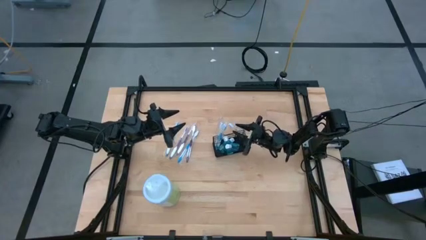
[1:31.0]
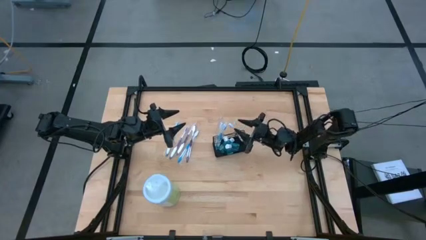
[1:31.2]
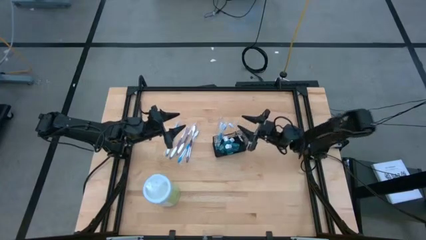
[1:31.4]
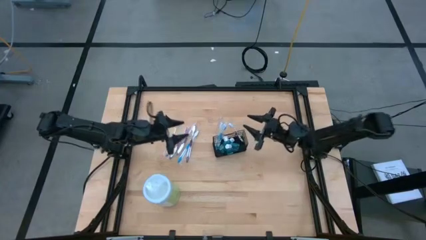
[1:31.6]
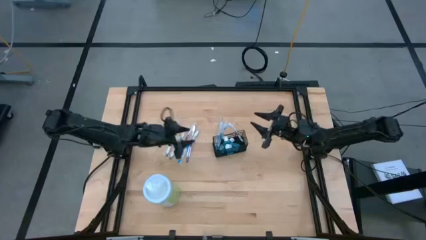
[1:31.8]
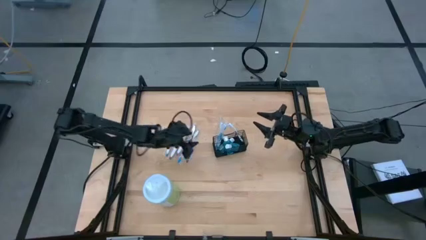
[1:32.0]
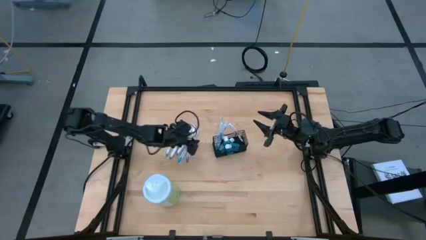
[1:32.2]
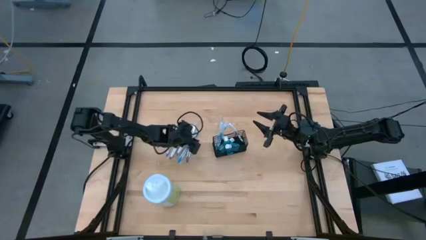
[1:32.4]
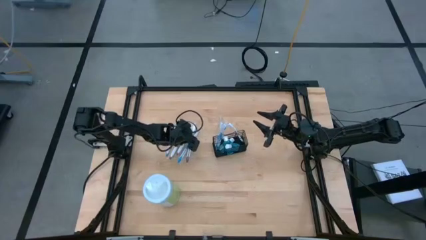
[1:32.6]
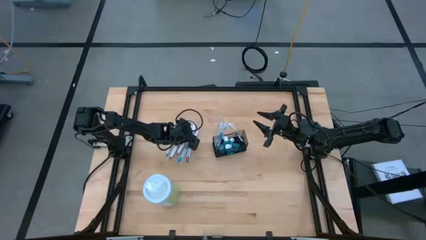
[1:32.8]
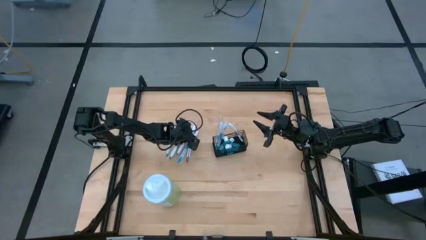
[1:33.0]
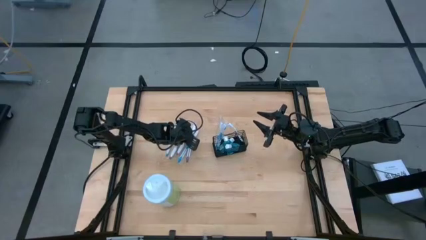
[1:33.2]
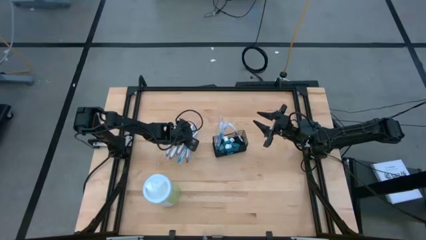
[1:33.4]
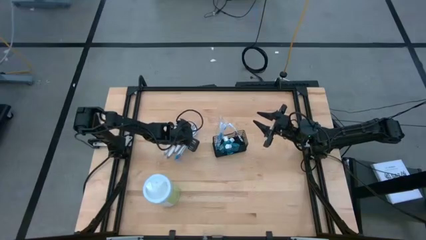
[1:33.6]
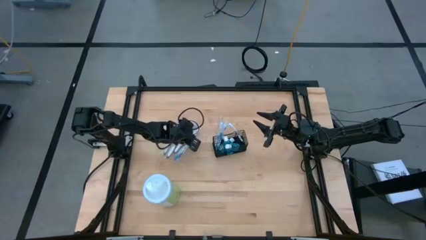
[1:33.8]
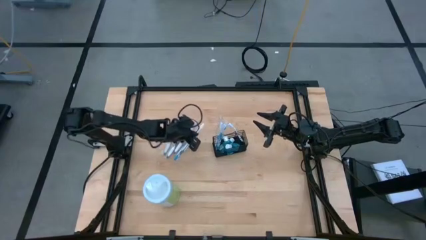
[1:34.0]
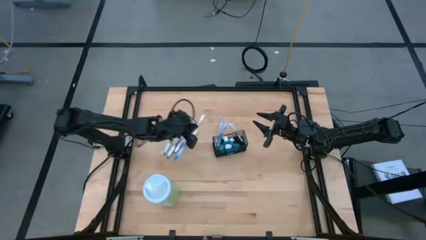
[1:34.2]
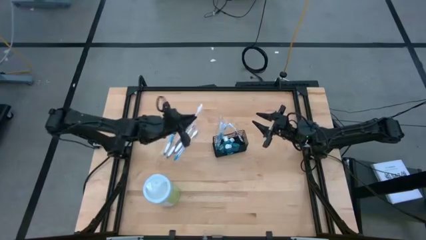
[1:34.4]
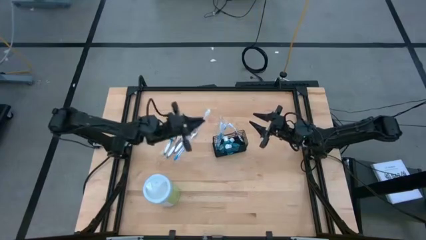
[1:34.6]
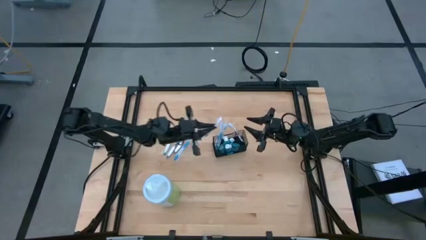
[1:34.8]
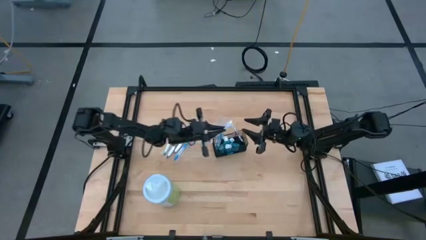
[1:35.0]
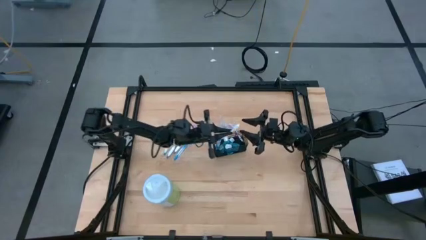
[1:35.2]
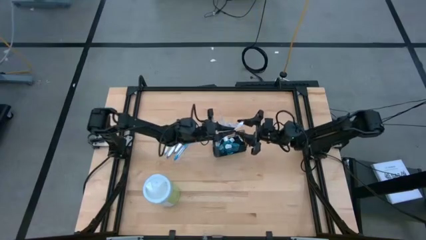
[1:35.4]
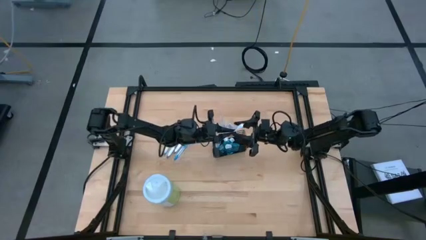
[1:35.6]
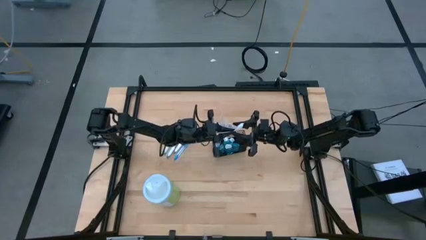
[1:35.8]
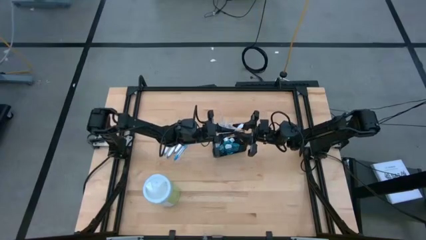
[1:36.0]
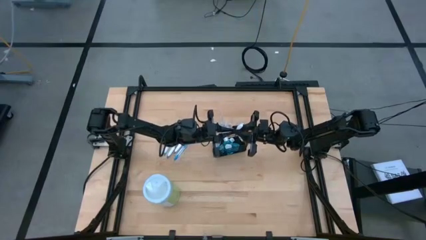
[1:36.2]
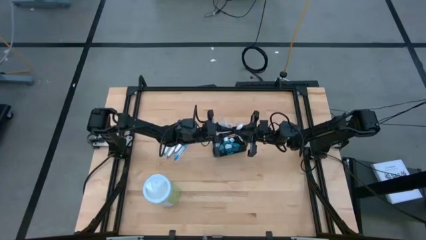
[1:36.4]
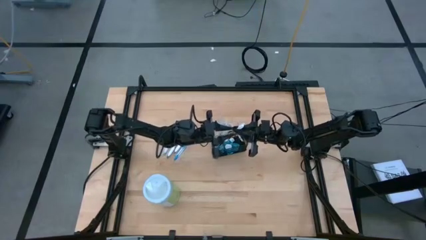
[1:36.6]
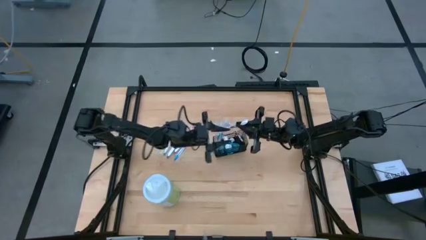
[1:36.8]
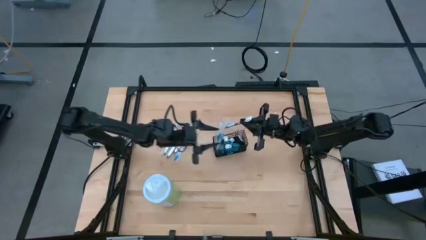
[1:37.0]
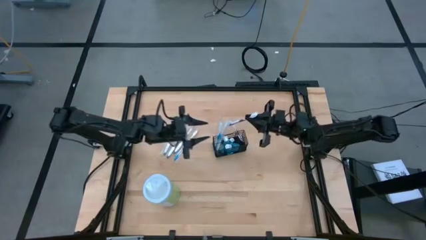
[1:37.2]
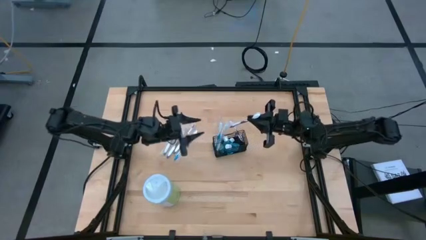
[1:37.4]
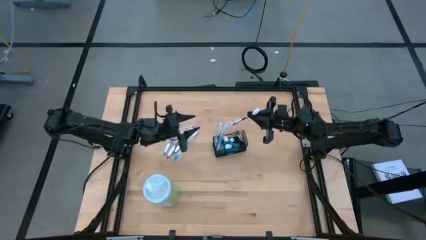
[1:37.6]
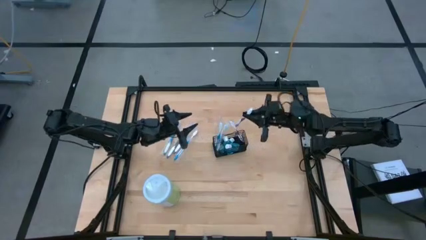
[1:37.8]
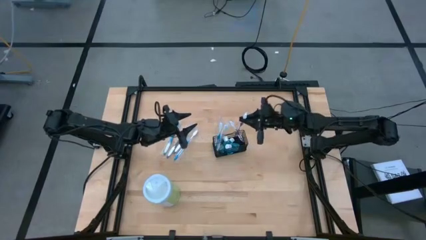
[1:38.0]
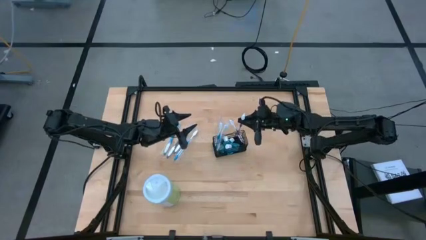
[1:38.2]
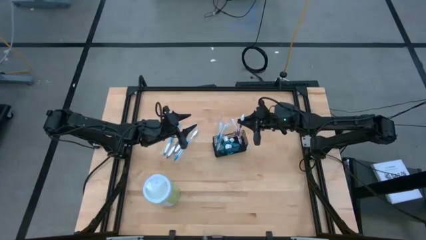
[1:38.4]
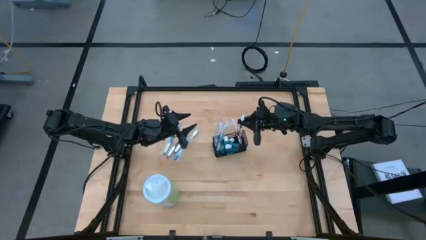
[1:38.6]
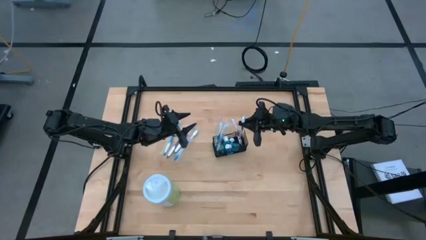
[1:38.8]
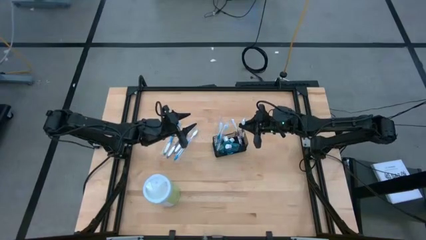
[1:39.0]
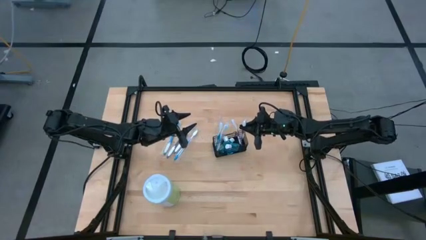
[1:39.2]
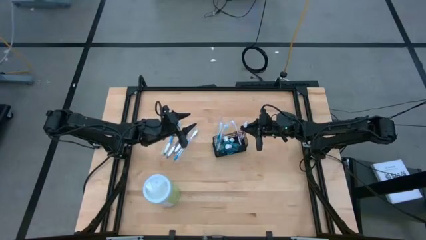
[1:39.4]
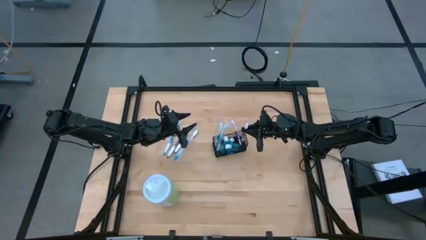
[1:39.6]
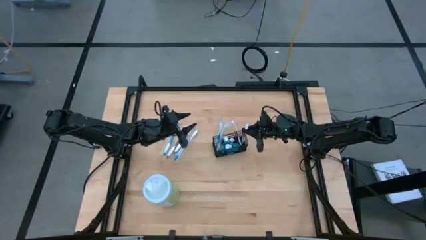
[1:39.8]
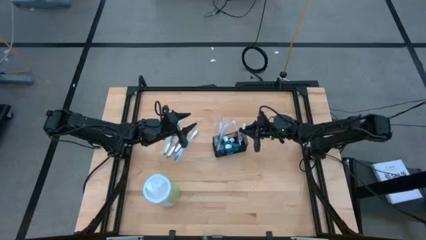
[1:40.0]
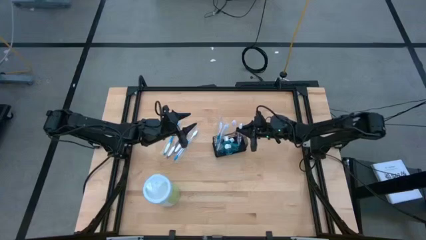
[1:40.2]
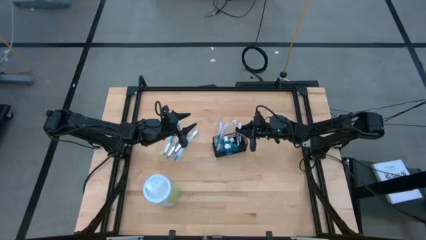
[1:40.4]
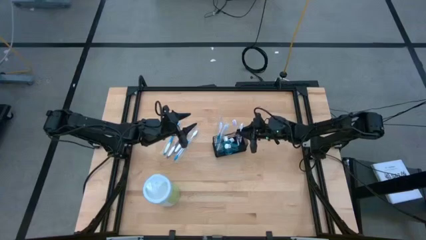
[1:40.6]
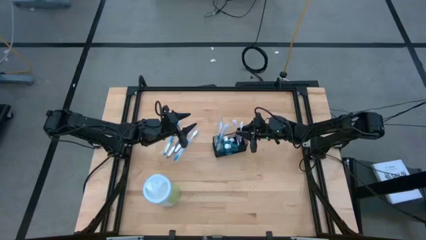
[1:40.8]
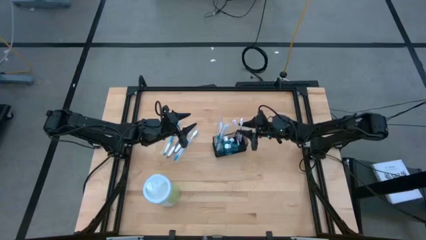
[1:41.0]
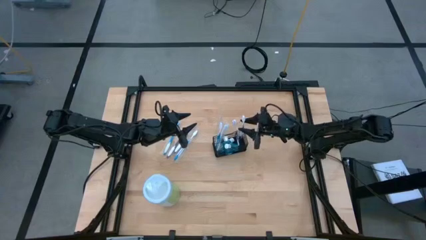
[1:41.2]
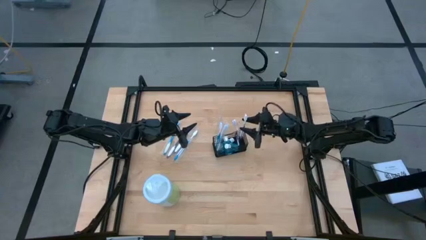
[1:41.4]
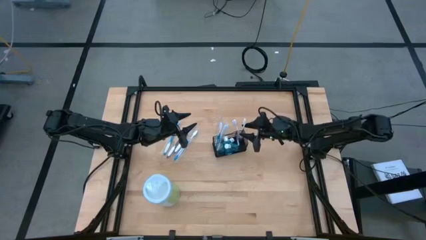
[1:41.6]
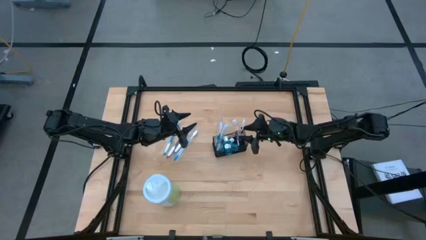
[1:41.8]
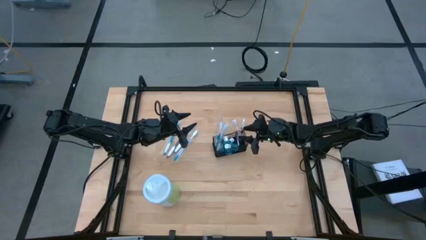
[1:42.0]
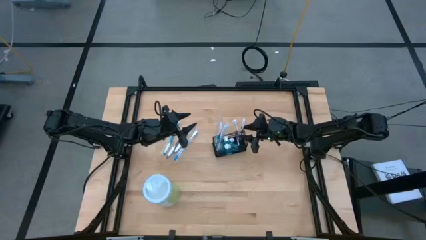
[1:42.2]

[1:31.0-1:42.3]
Task: Pick & Place toothbrushing station
Put the purple toothbrush into the black mesh organizer

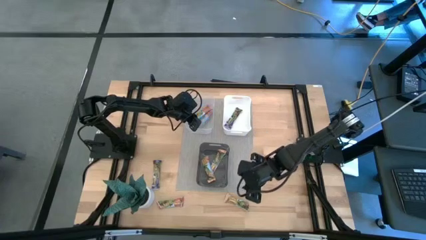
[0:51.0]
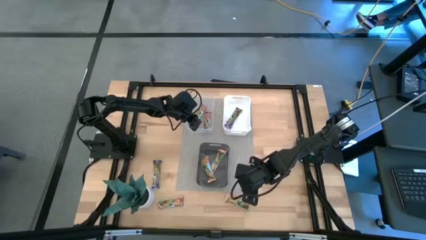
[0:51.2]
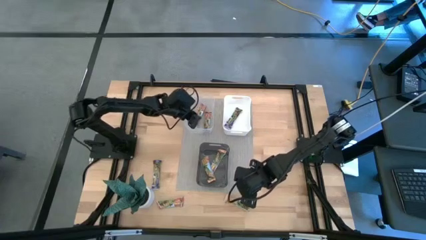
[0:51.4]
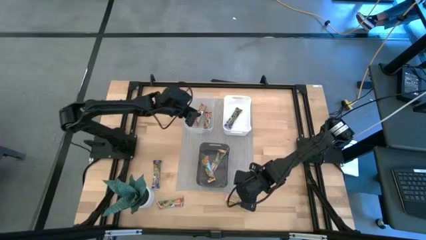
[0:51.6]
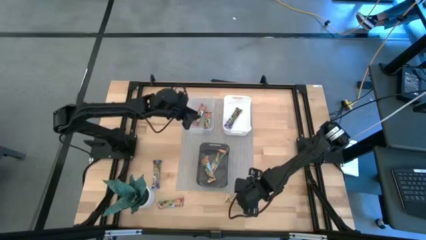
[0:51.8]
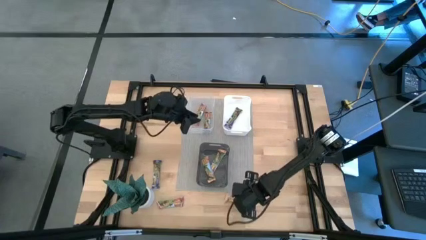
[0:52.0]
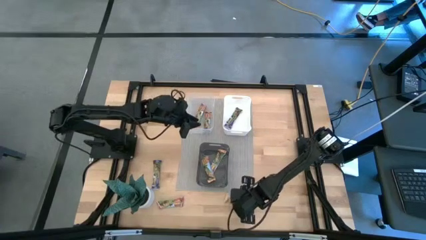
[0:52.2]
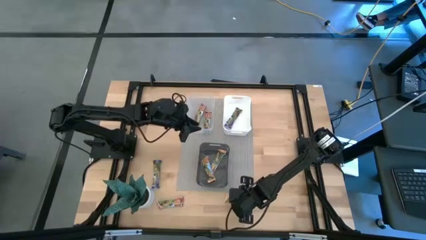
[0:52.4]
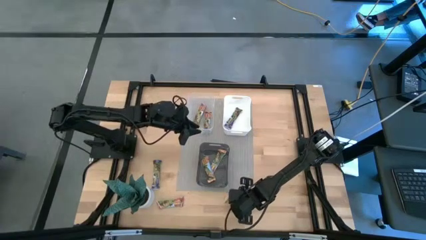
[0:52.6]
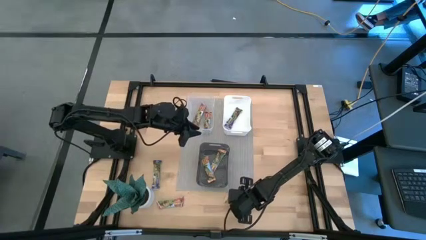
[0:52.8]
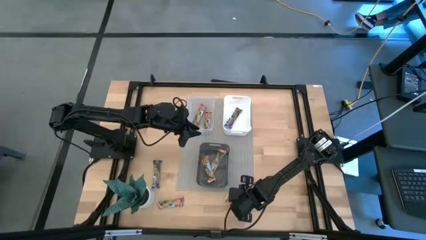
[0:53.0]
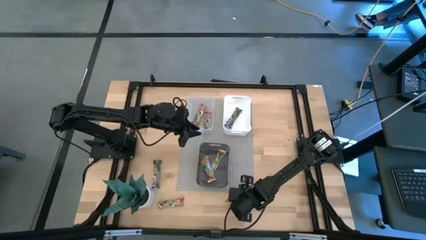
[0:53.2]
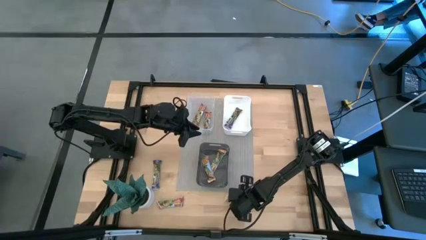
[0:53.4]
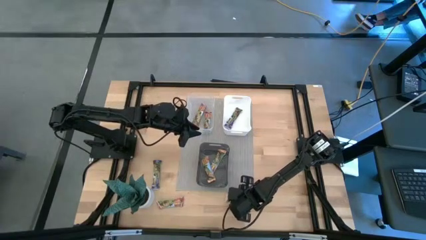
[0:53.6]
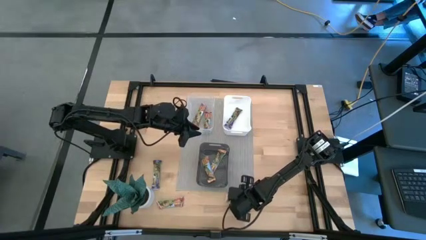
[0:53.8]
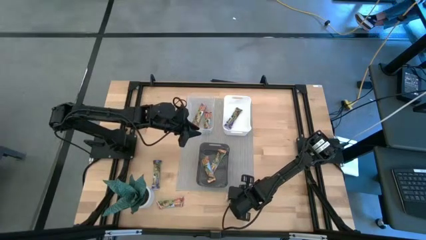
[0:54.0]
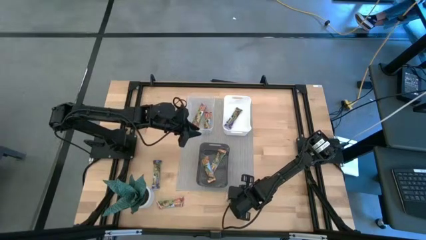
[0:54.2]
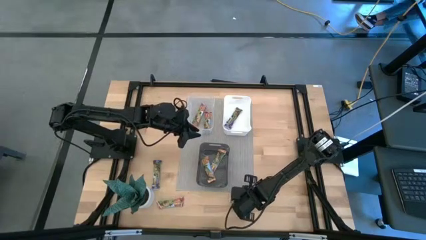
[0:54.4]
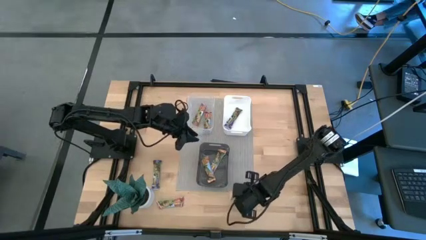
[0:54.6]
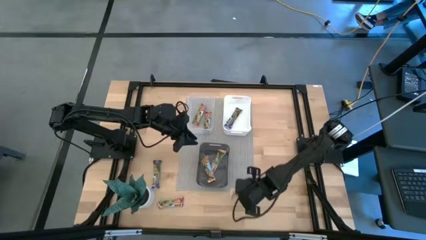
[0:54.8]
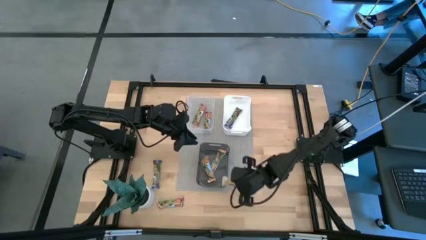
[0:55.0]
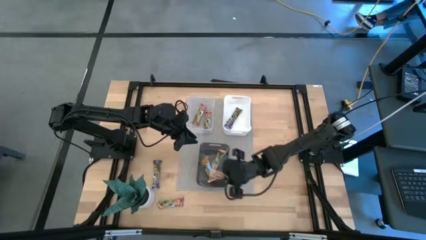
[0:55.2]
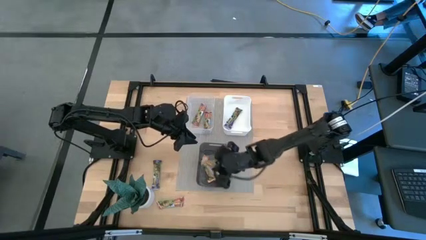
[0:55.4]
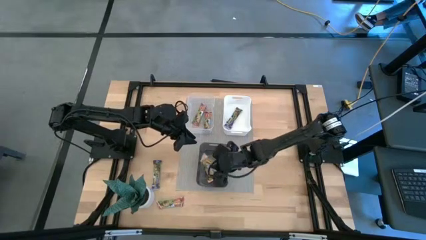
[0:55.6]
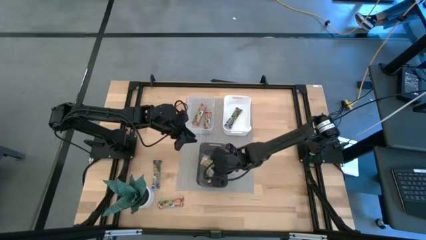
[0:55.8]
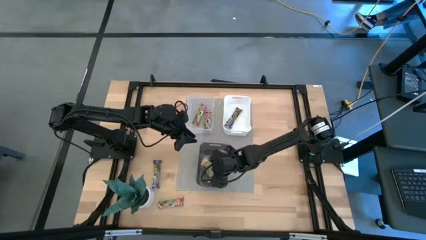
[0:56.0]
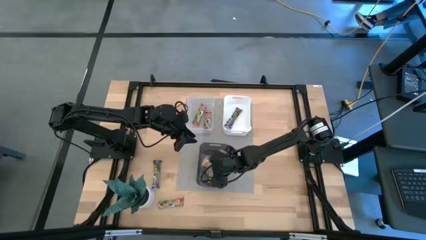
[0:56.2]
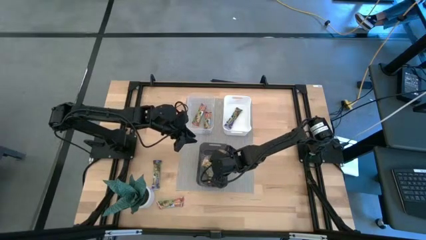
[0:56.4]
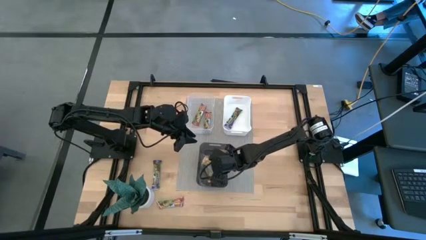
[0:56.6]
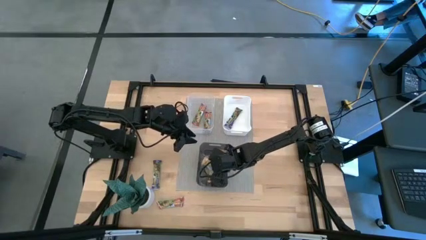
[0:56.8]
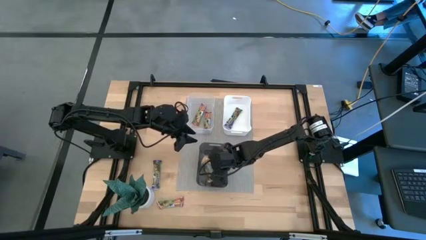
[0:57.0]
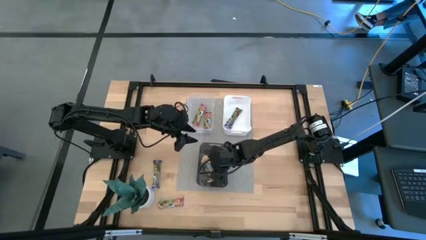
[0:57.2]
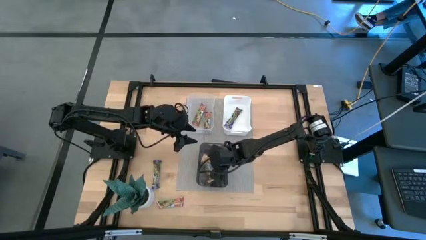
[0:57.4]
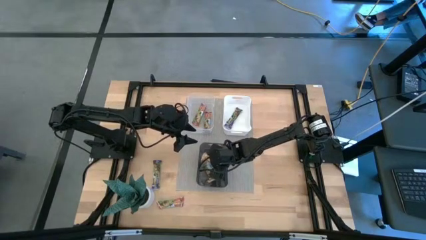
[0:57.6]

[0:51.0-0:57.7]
Task: Pick and place Granola Bars by type
Put the yellow granola bar into the black bin
